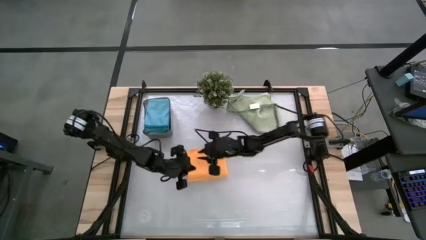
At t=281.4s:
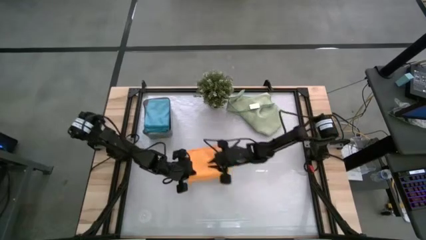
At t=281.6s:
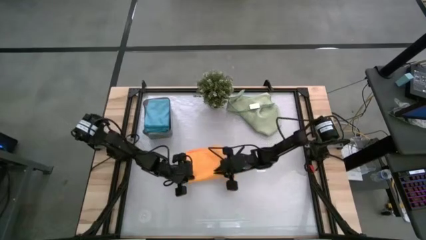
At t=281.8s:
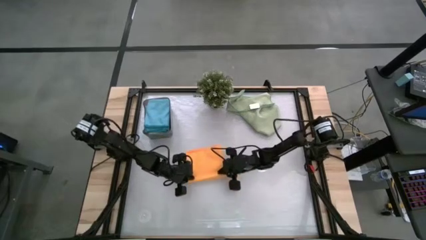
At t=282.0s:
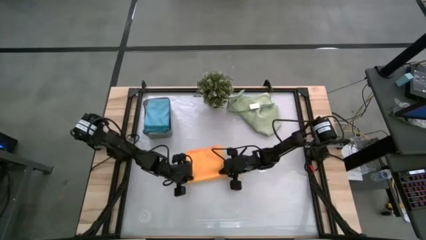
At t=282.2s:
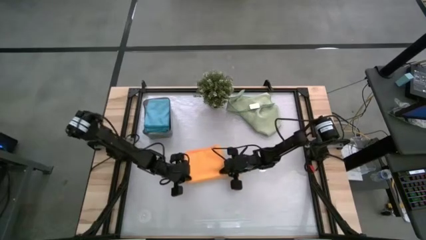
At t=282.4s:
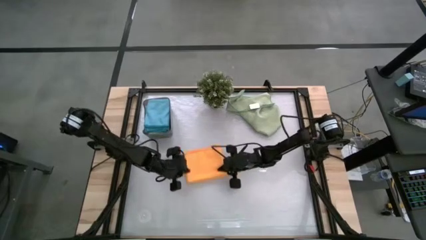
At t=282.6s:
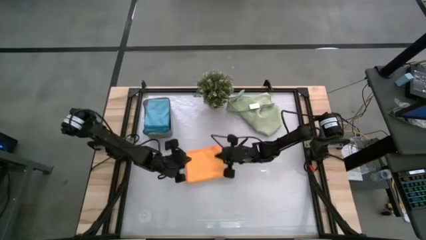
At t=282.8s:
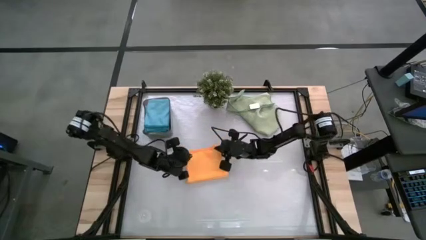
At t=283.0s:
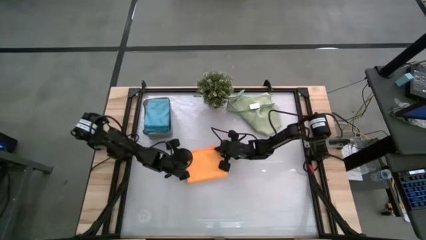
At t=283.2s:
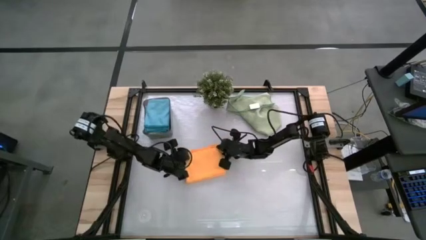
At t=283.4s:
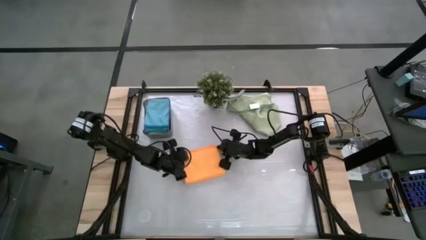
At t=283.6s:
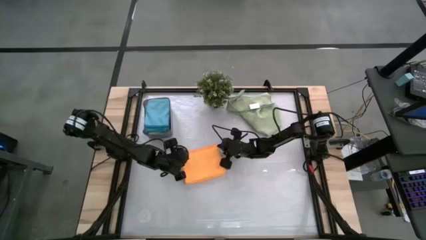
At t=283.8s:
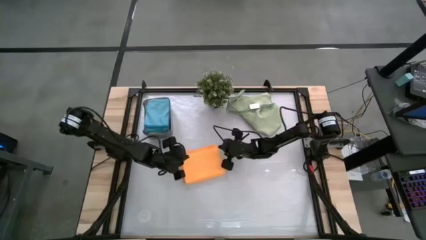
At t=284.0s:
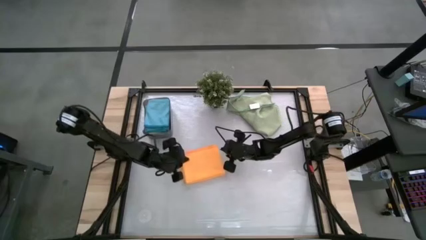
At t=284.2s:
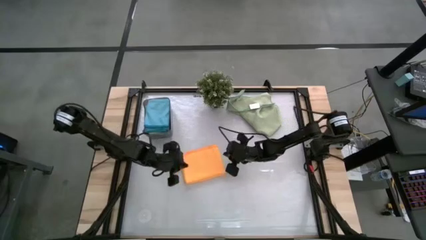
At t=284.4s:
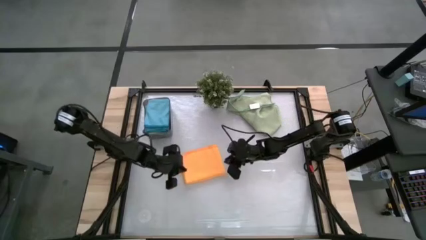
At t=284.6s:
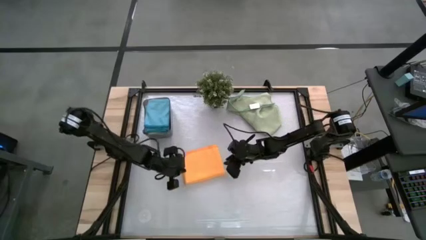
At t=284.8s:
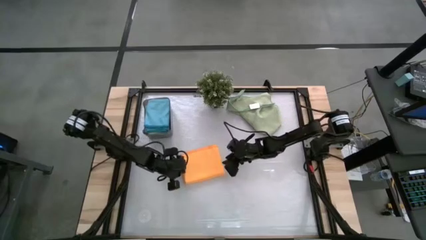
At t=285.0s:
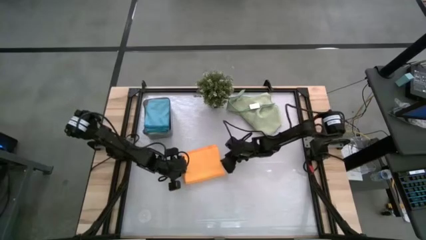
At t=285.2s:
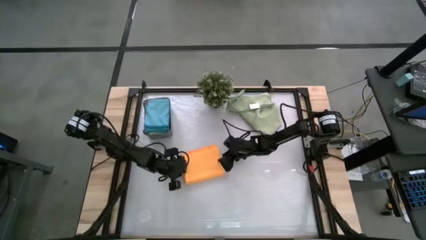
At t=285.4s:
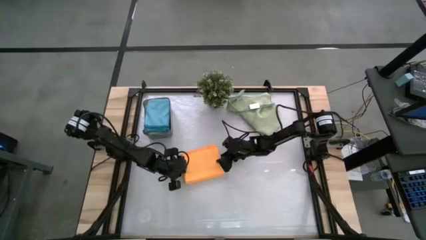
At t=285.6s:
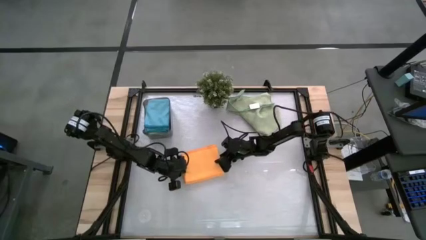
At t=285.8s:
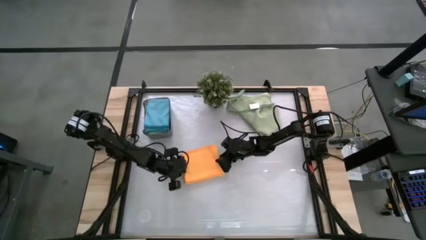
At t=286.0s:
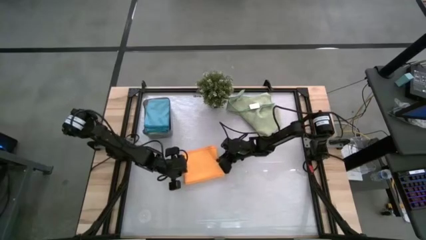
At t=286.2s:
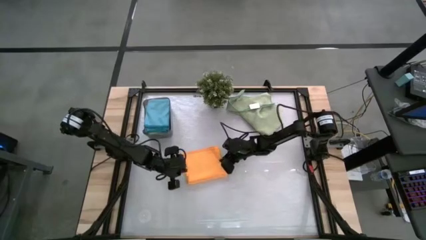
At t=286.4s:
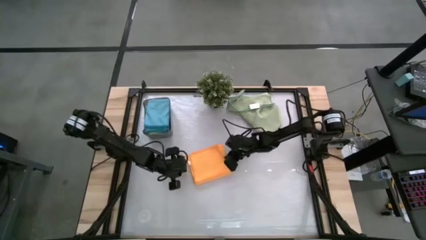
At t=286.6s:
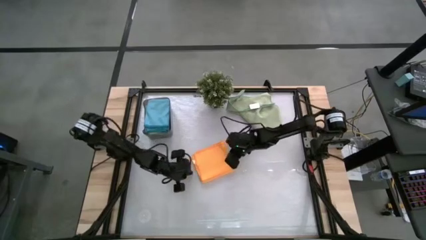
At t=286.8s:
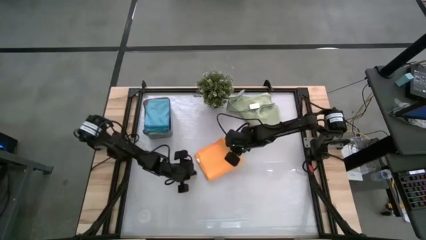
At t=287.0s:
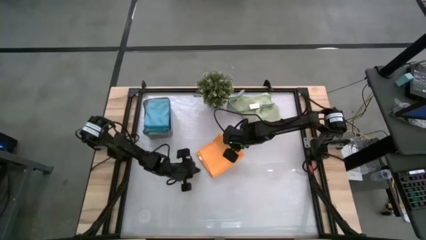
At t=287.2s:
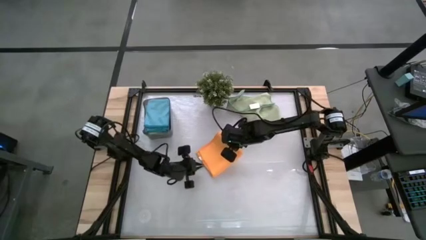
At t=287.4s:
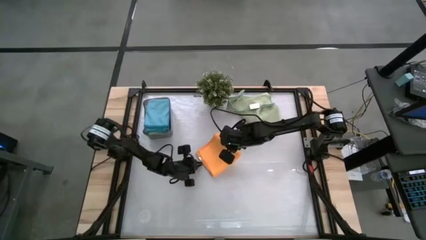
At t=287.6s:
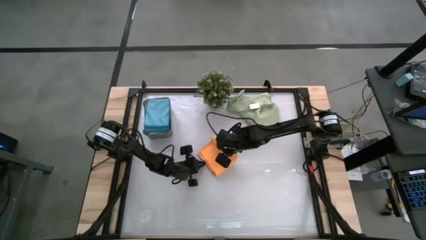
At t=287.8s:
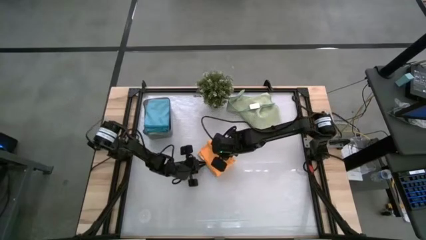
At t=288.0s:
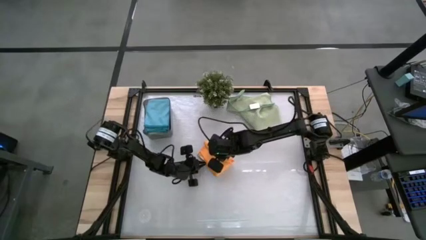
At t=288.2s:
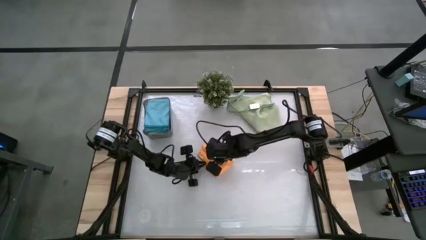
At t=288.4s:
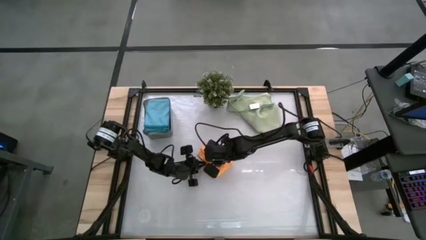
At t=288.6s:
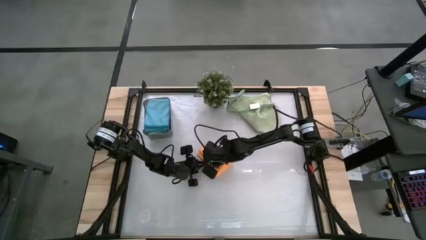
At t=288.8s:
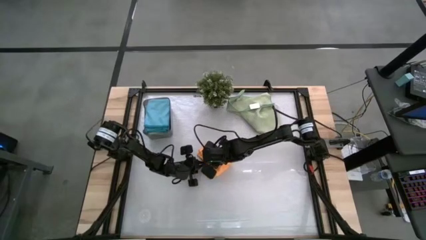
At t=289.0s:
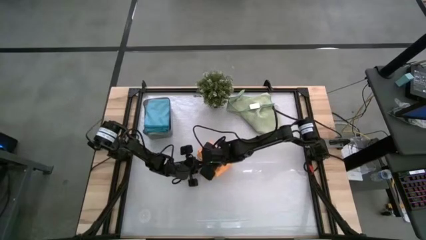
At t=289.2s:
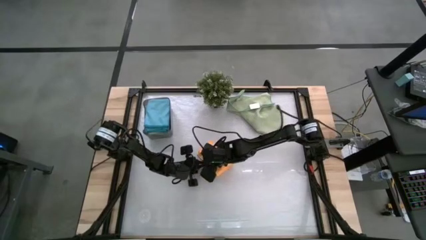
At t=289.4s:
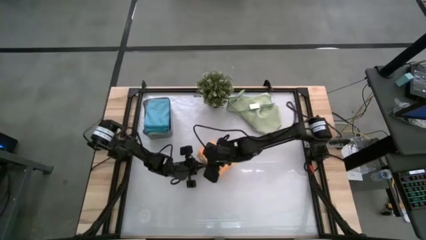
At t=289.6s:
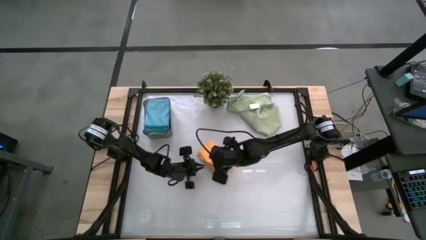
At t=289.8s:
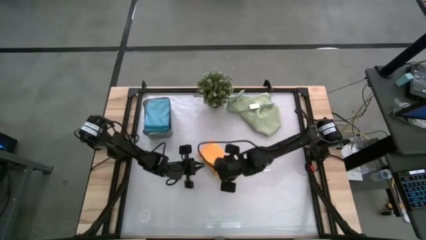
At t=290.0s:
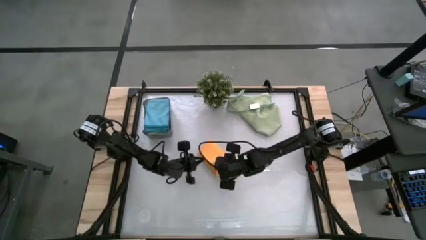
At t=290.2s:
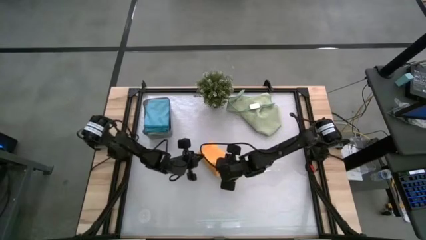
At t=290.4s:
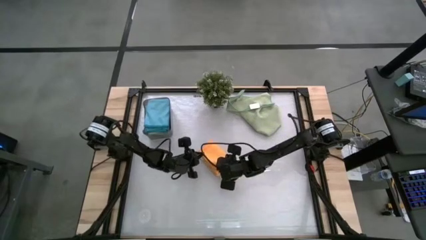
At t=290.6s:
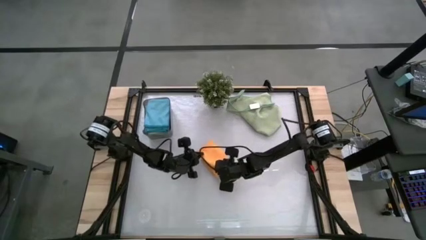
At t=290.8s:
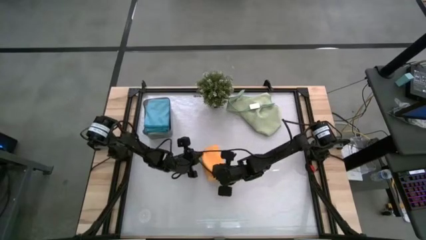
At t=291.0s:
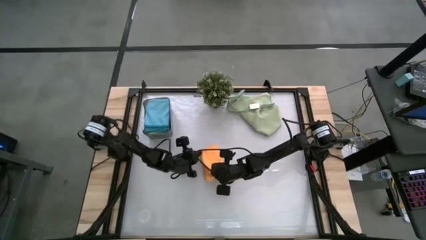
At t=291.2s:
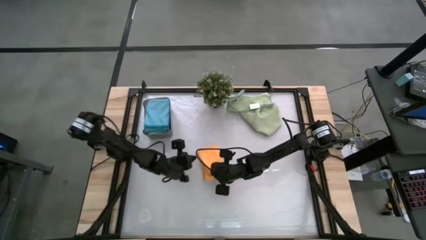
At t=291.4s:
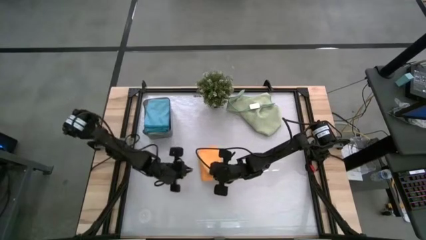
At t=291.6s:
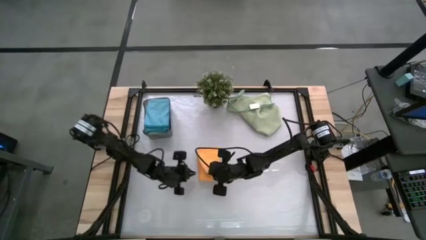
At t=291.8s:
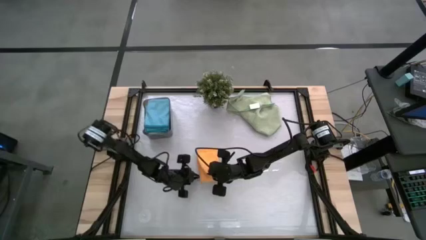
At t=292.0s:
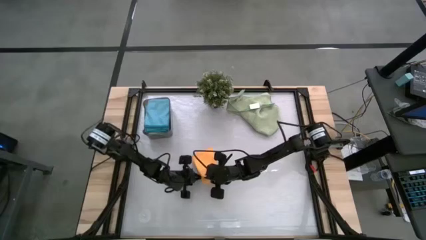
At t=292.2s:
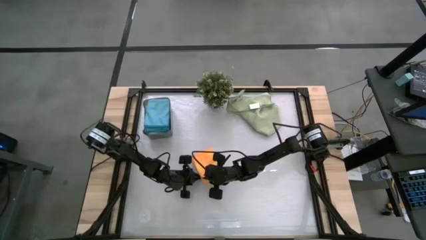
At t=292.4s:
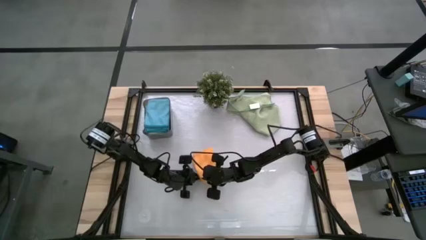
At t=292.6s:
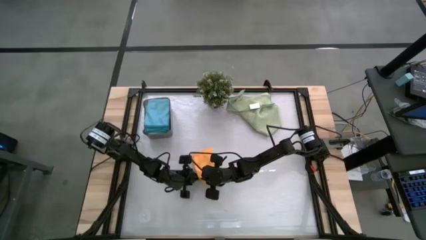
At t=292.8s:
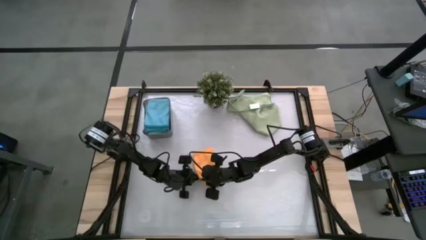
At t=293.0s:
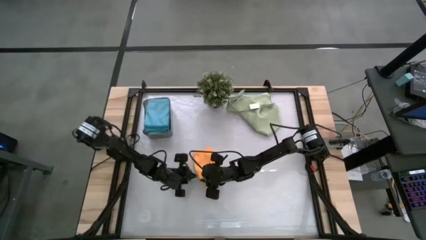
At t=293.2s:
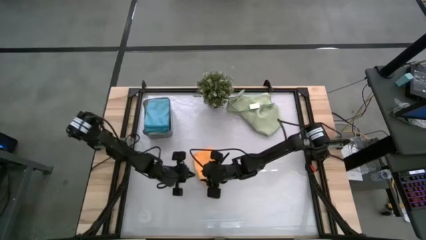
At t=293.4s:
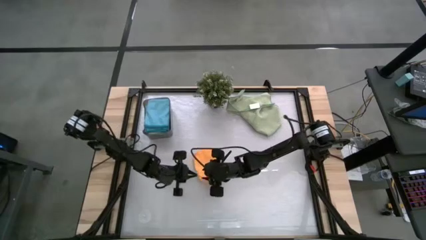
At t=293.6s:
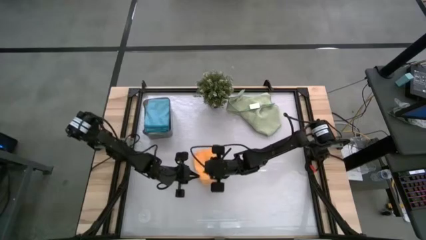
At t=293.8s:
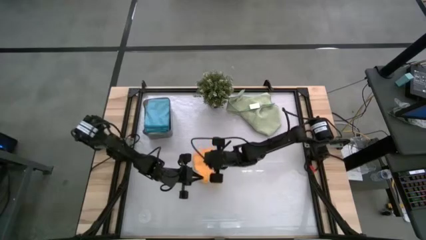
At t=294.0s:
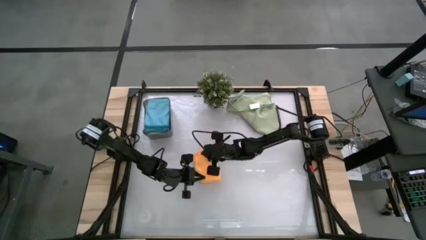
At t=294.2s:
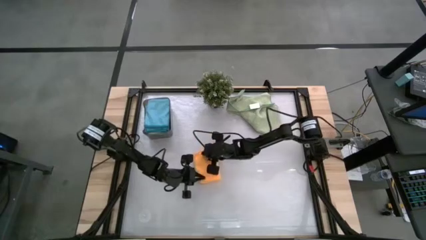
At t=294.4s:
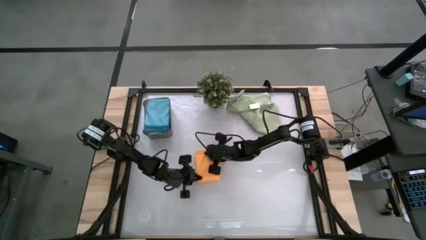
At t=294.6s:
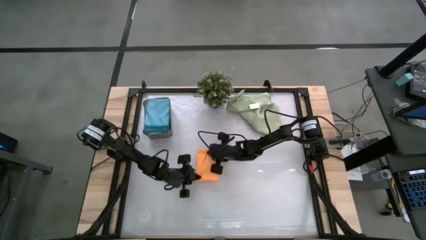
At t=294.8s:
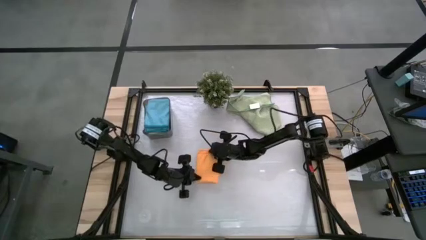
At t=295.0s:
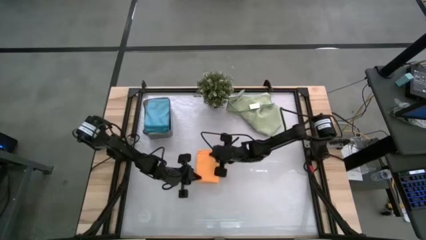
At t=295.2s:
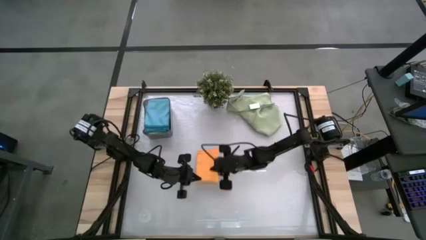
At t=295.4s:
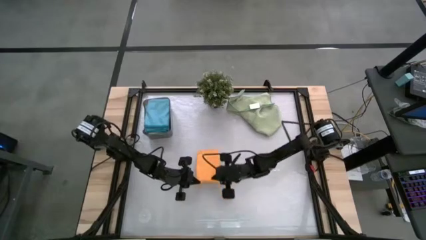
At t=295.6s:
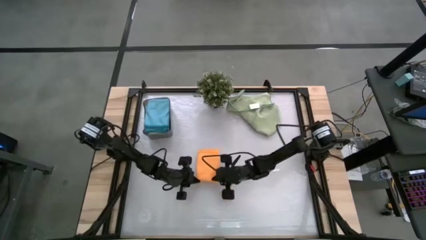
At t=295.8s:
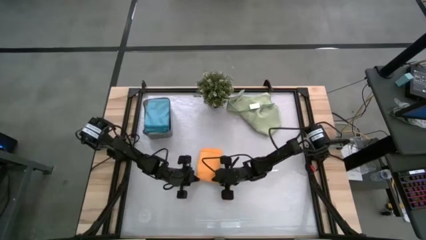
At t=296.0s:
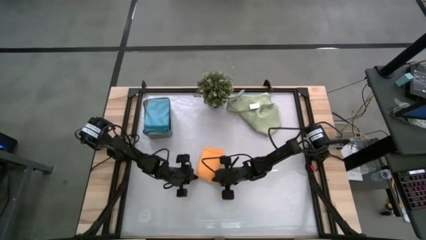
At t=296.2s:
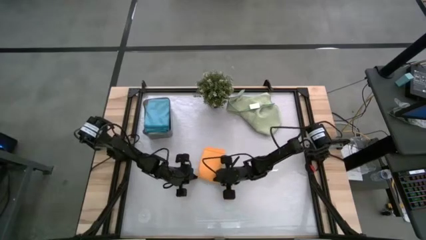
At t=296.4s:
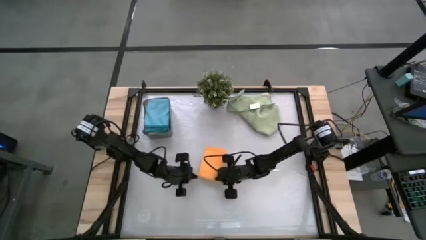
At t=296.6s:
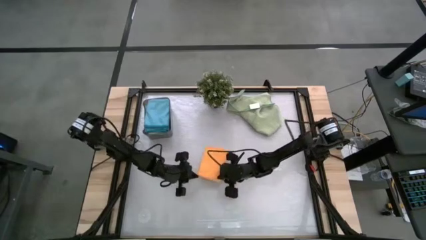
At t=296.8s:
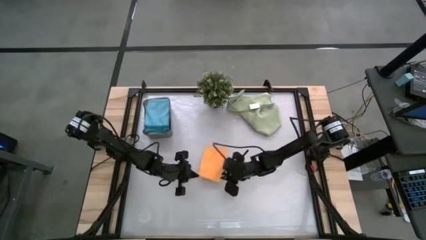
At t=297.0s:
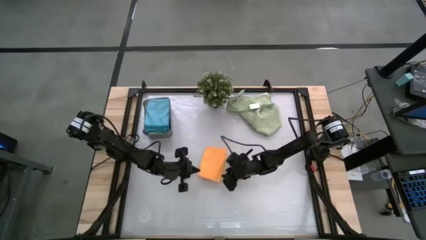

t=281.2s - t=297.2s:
Task: Fold microfiber towels
Fold the orange microfiber cloth
